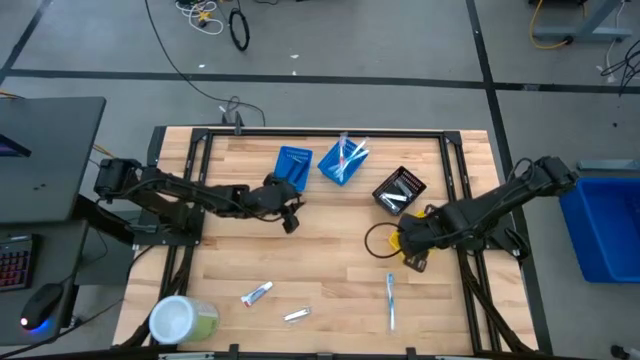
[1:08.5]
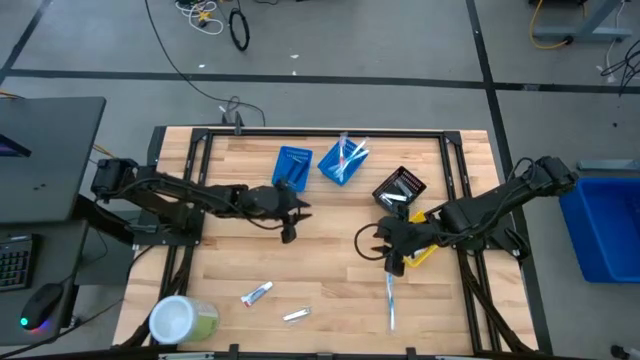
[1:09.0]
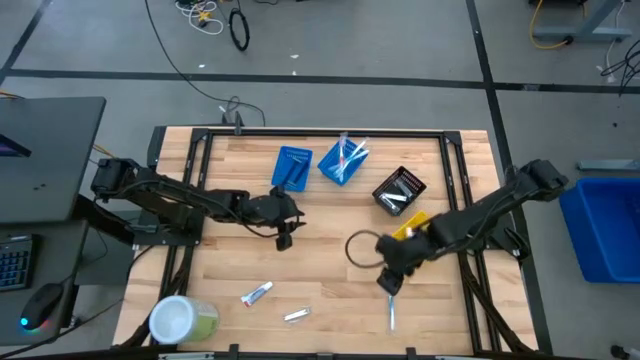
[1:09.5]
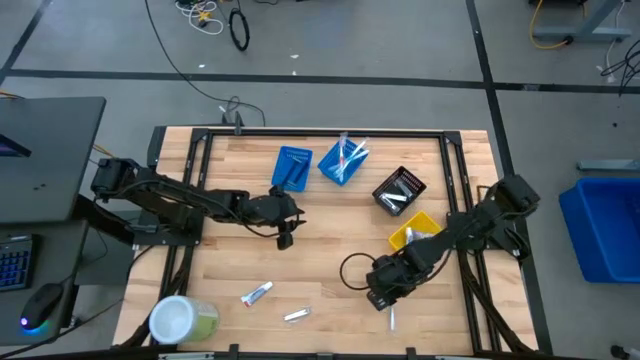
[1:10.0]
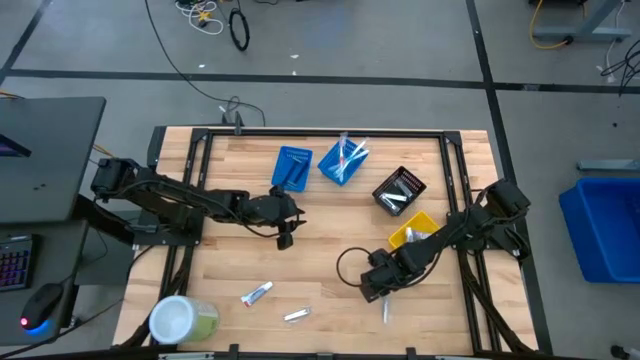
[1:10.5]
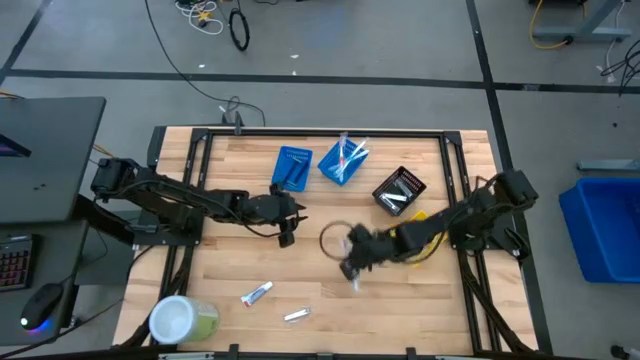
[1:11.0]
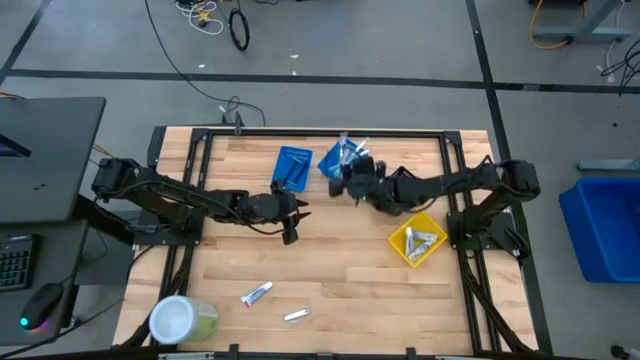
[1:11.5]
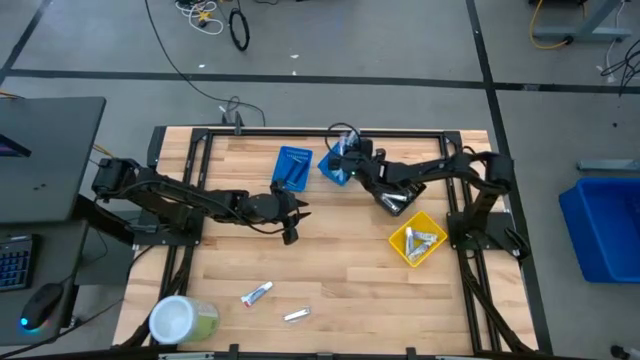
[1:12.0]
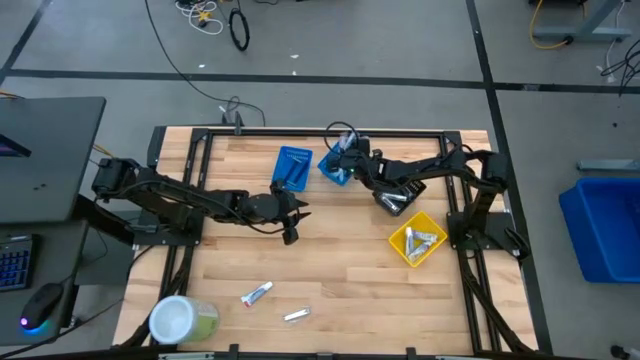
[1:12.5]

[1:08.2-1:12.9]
Task: Pick & Place Travel size toiletries
Put the blue toothbrush into the right blue basket

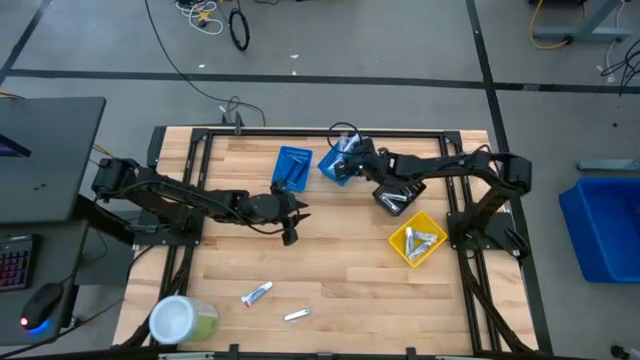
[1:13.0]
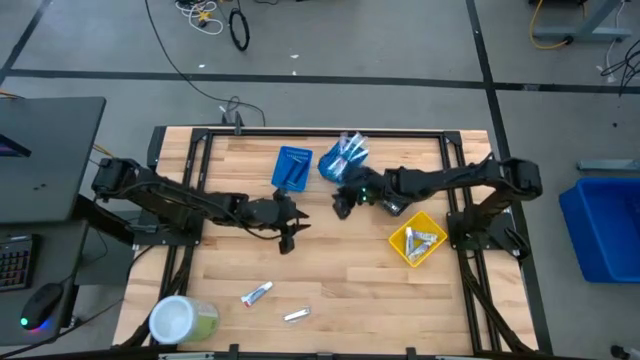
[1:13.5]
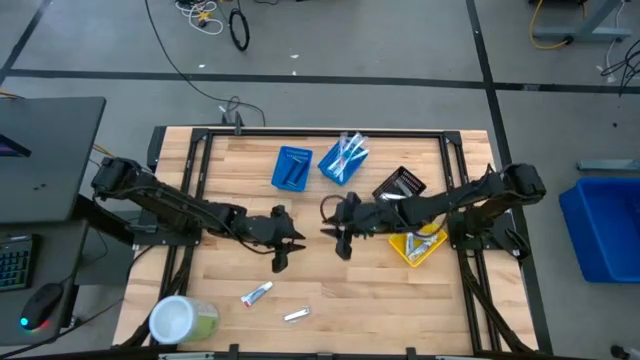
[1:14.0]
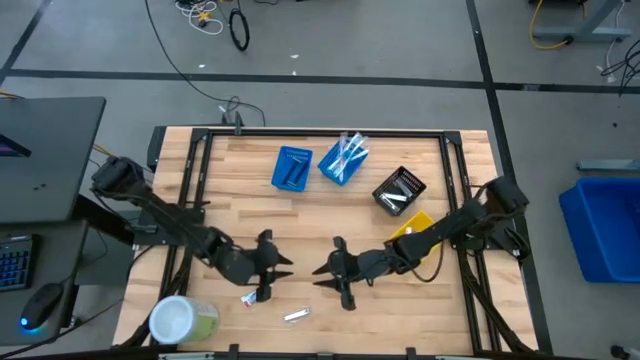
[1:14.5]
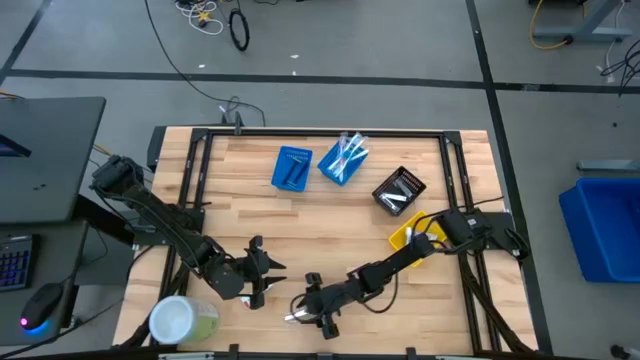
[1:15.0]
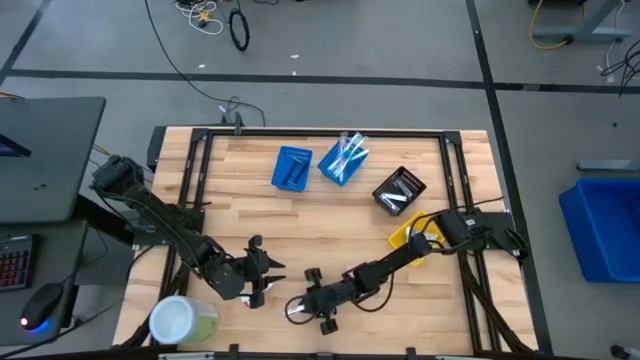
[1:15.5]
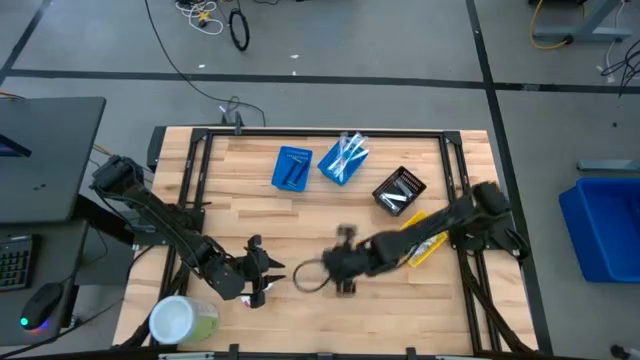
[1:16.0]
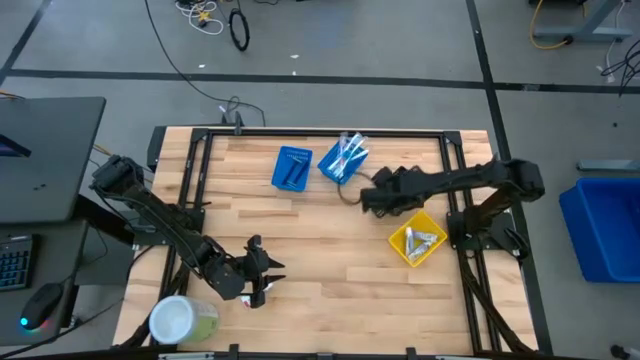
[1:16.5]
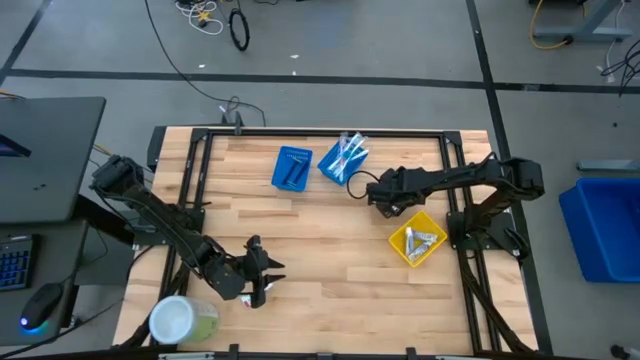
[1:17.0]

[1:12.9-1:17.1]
Put the silver nail cutter into the black basket

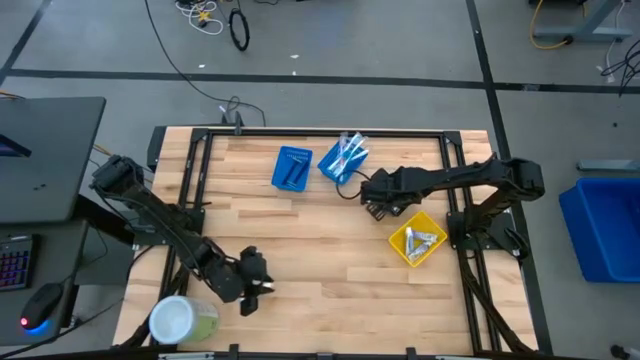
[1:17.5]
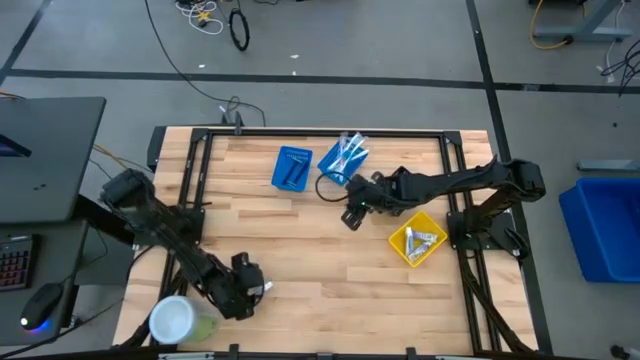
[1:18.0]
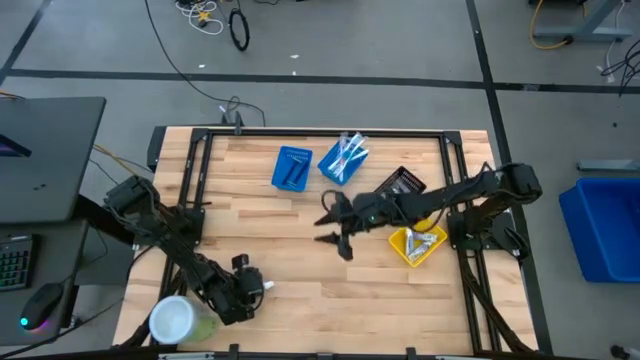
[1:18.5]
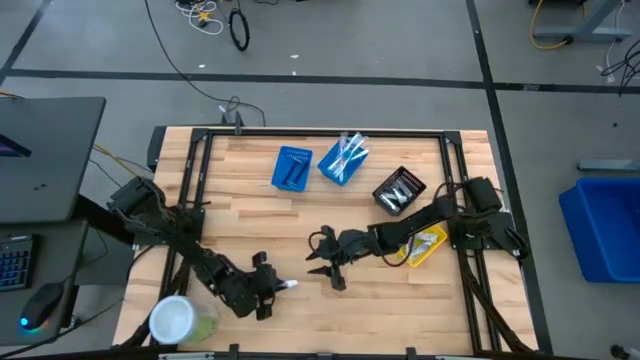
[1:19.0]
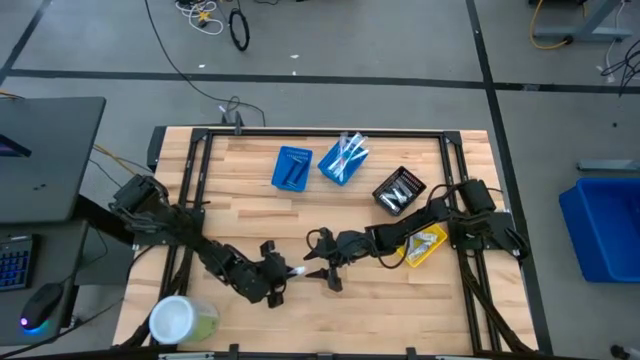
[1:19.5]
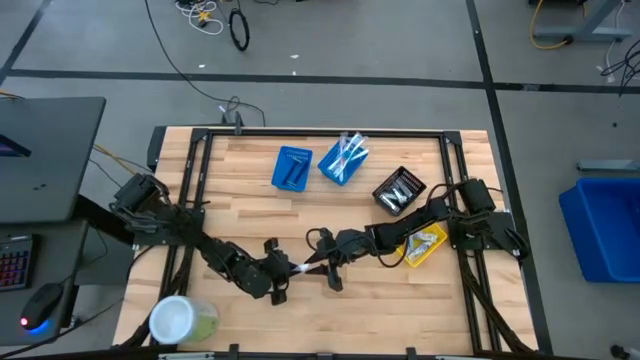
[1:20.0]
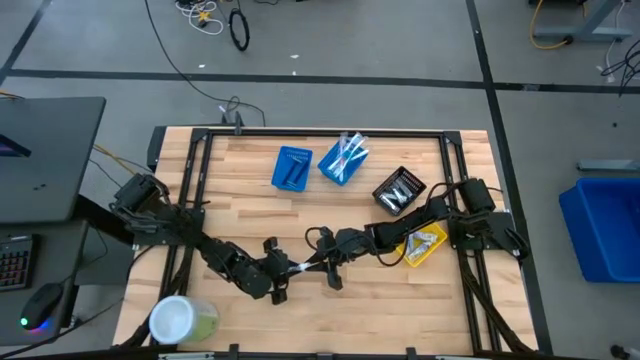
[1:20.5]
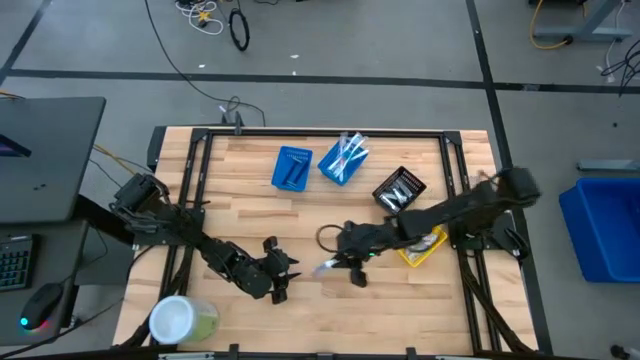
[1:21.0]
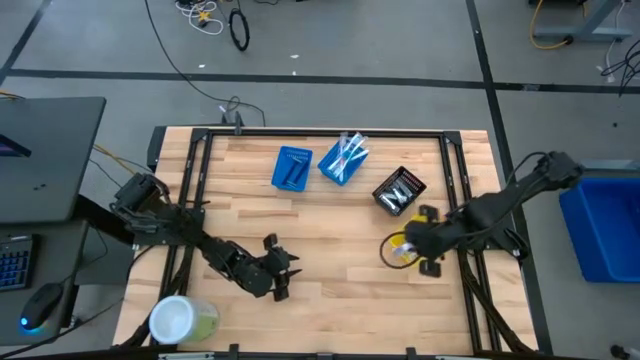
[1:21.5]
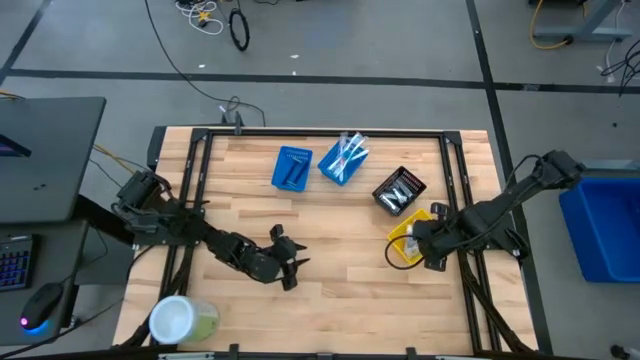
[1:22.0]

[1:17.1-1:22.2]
Put the white toothpaste into the yellow basket

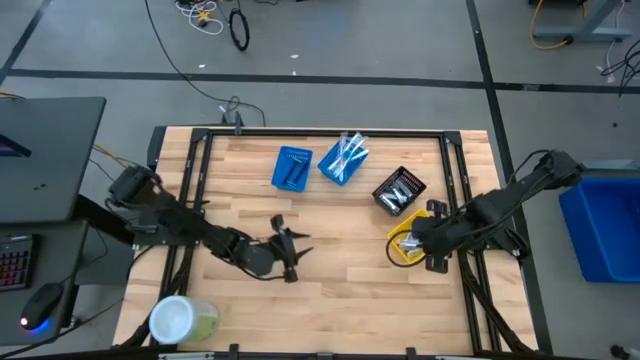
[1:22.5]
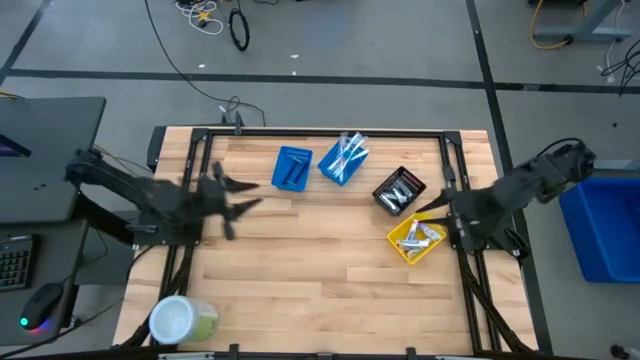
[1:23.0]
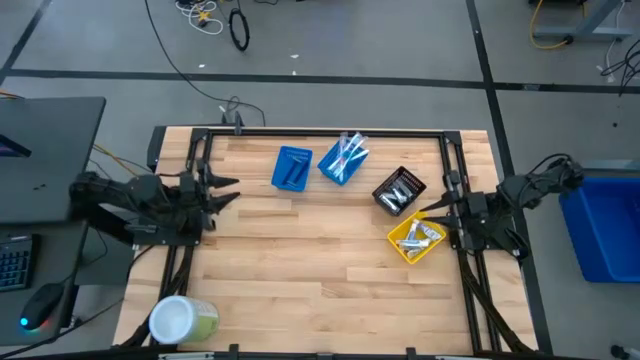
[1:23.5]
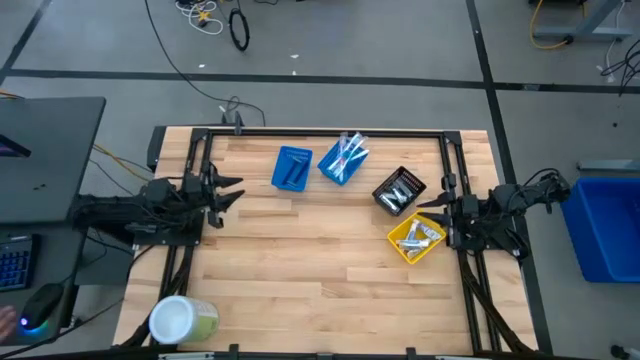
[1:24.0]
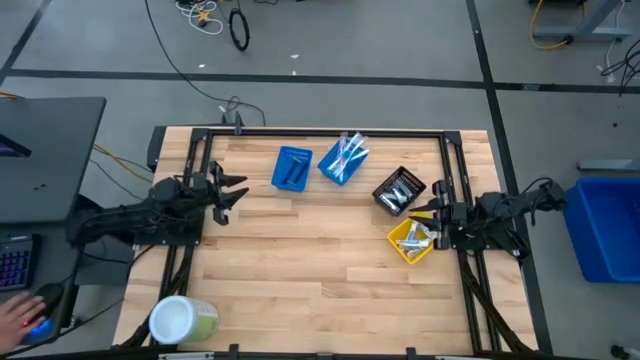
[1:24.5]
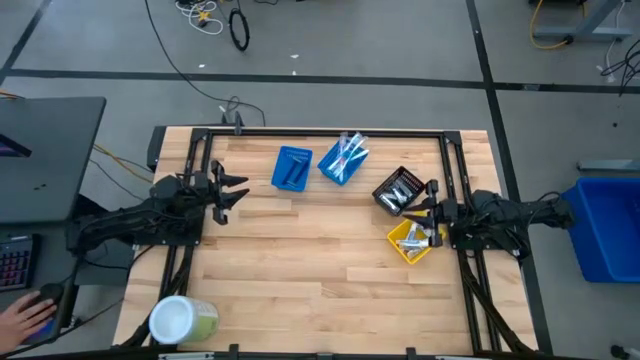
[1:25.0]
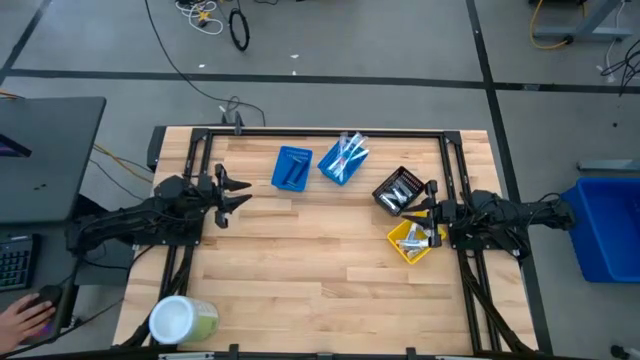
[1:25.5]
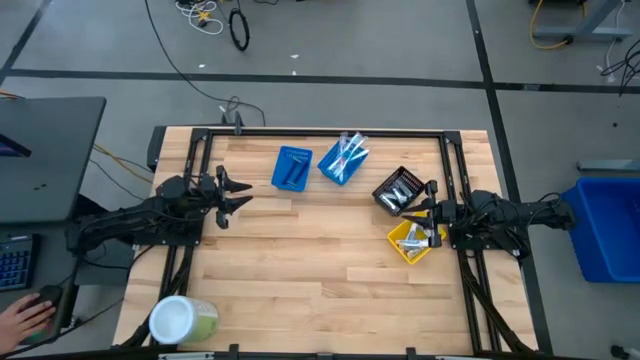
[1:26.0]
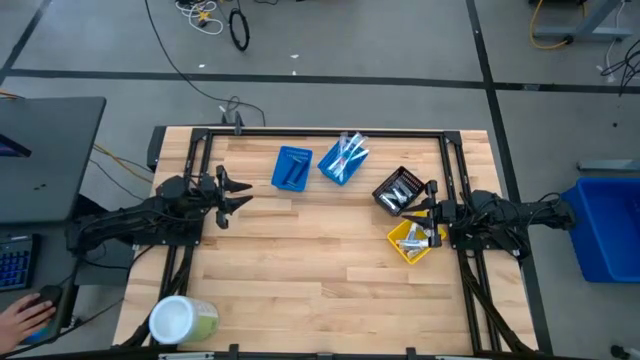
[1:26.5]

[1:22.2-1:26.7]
Return to Home Position

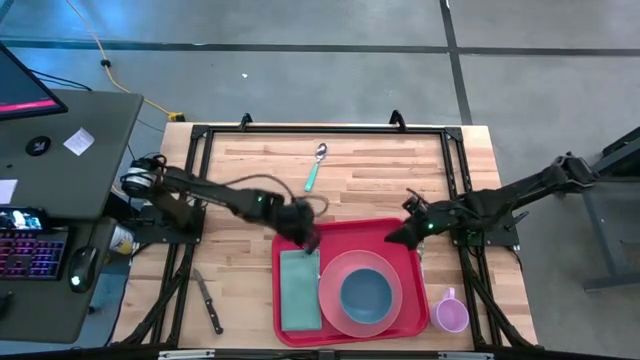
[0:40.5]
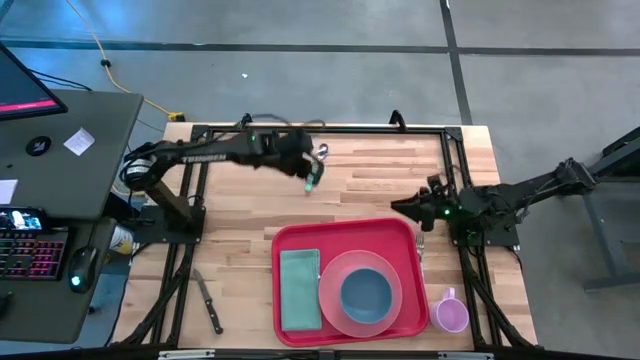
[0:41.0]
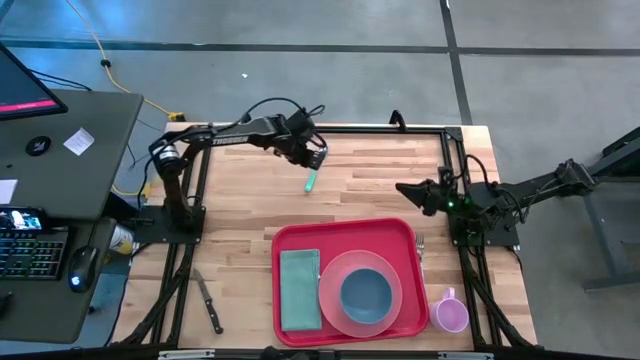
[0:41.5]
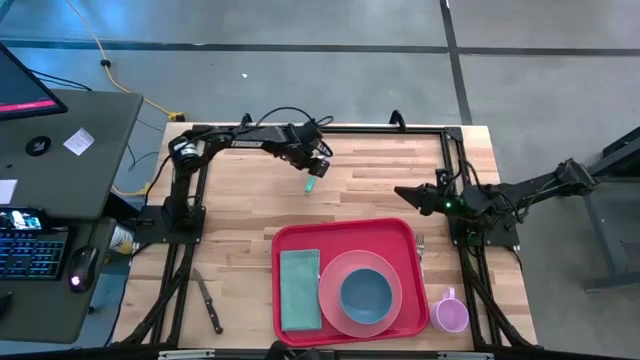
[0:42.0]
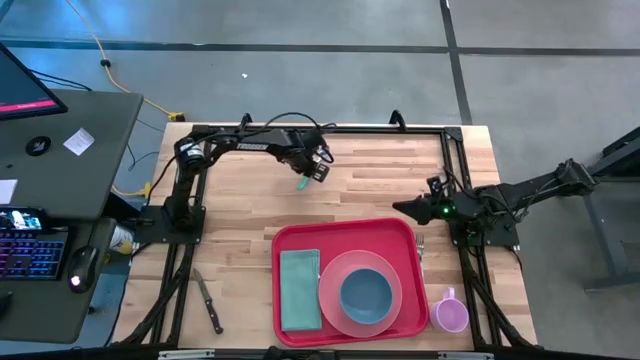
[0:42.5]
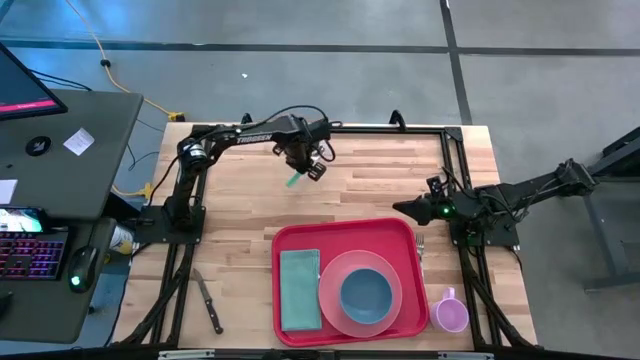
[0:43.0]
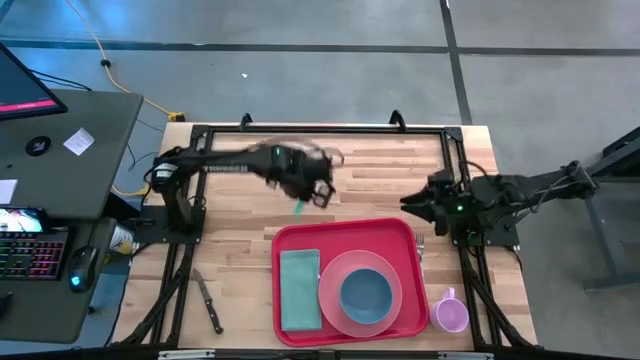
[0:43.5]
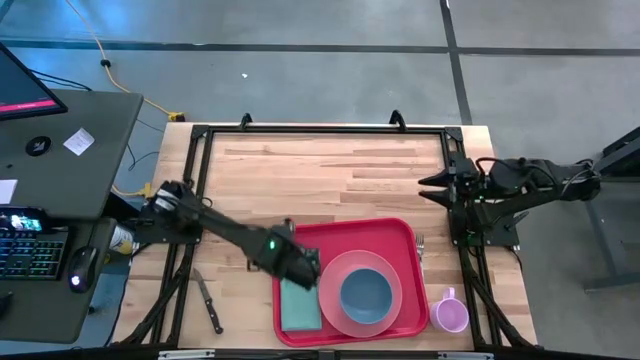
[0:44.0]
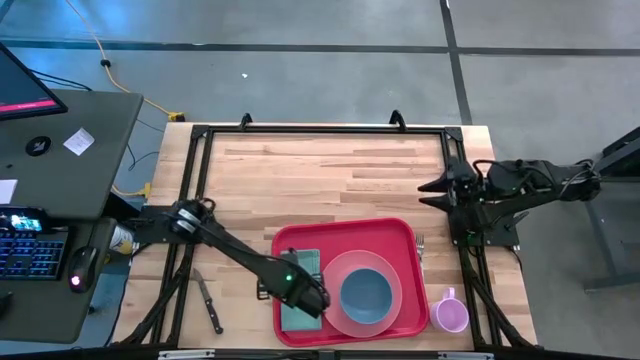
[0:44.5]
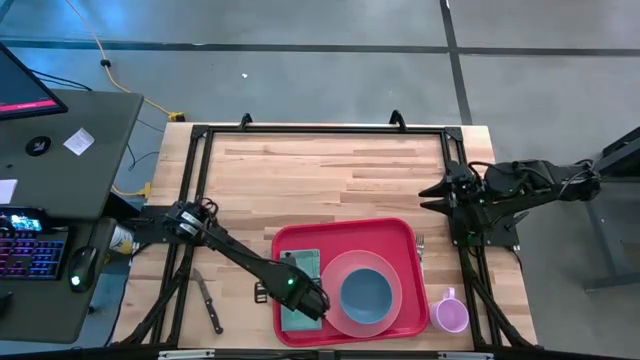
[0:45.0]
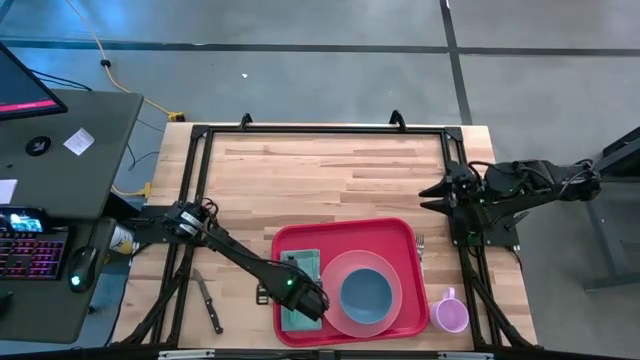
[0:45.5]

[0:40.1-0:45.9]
Task: Set up tray
Put the blue spoon on the blue napkin
